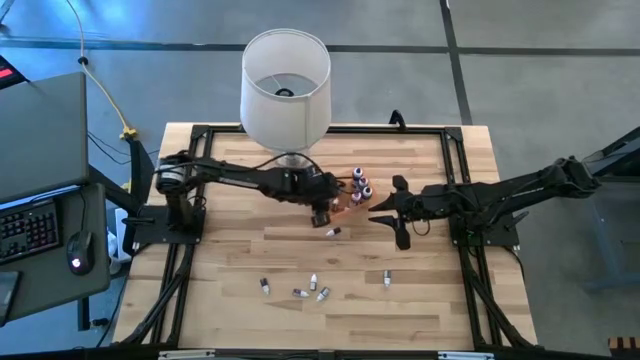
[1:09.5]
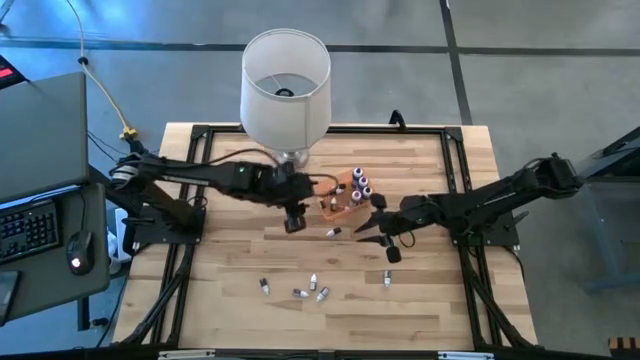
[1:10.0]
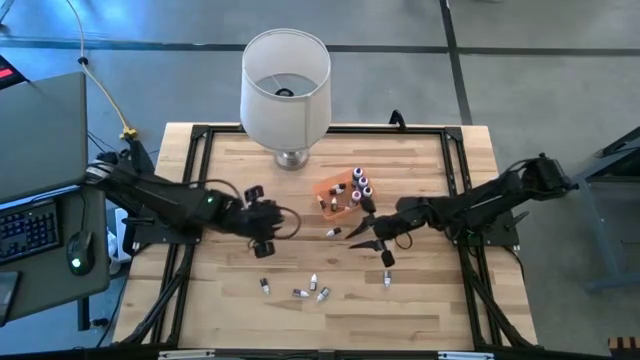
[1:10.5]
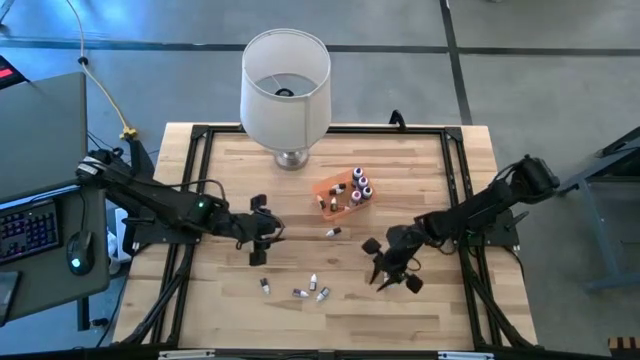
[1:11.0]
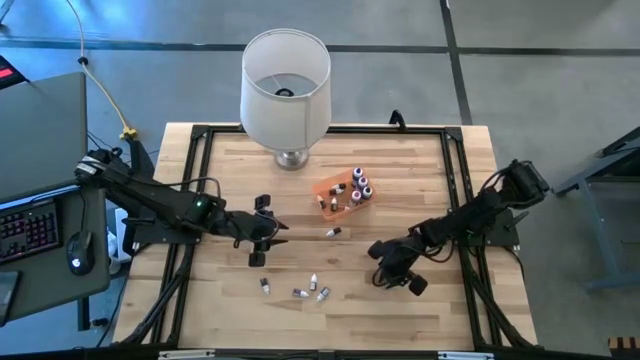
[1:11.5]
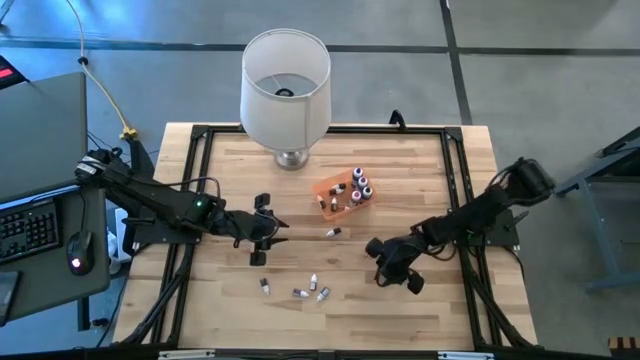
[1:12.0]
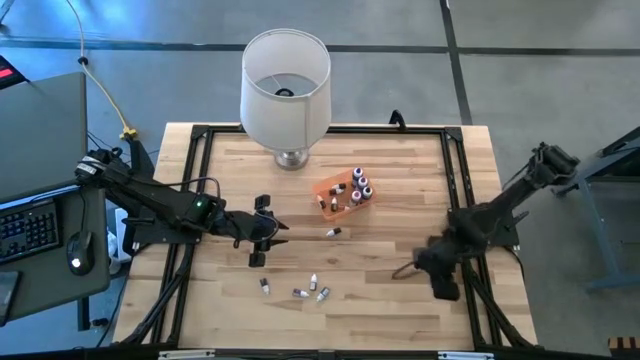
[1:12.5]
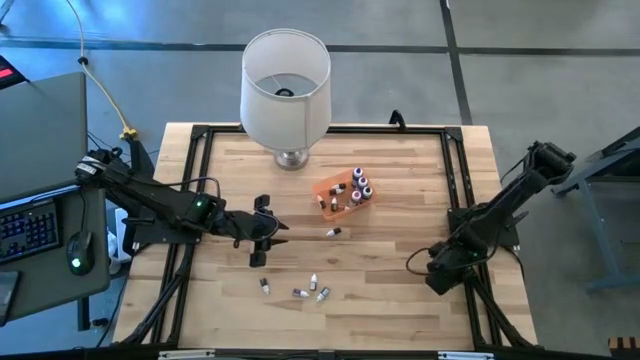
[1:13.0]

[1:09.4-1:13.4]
Task: Pick & Place food coloring
Put the small dark green food coloring bottle into the orange bin

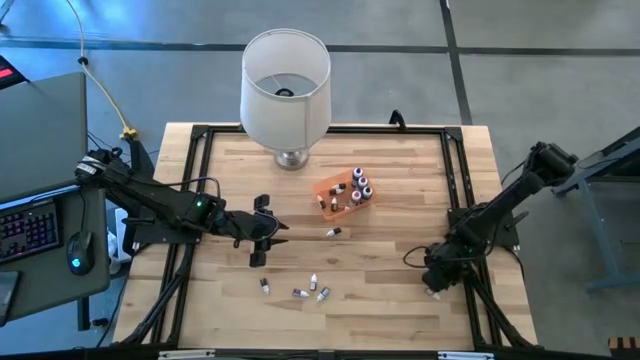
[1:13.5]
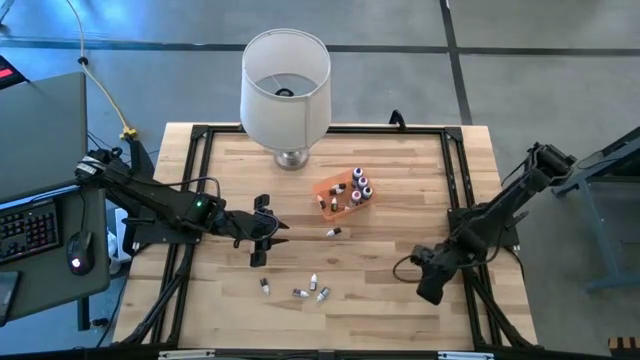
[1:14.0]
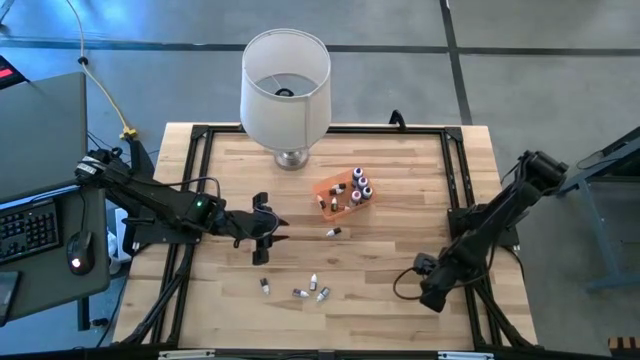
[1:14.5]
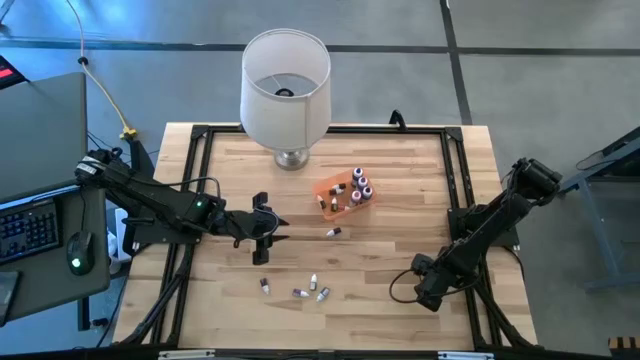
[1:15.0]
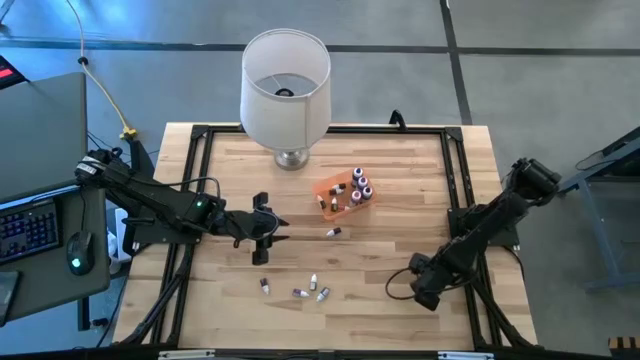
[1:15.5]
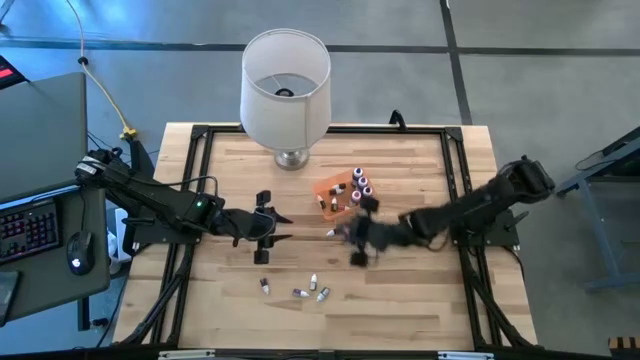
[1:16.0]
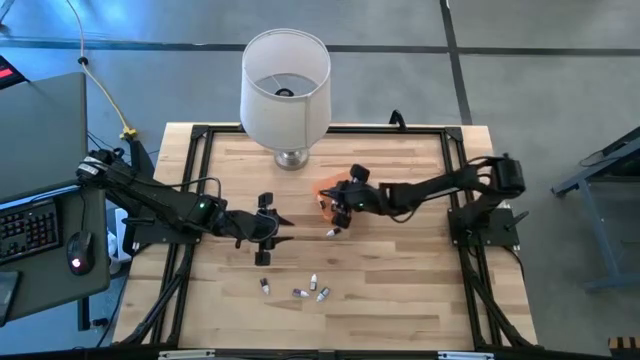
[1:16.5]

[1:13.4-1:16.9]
Put the small dark green food coloring bottle into the orange bin

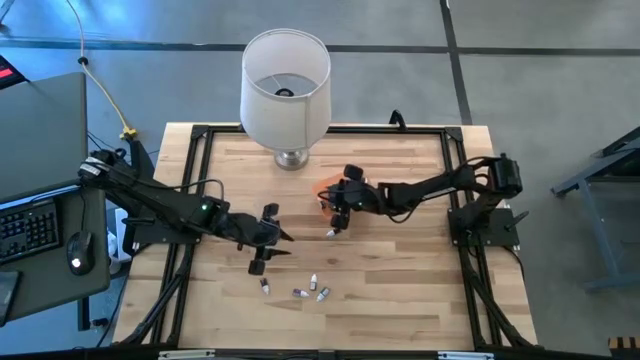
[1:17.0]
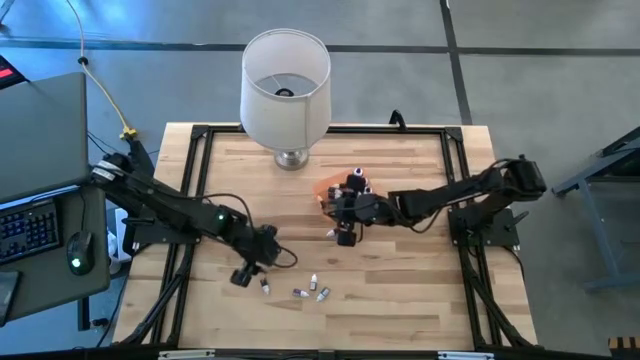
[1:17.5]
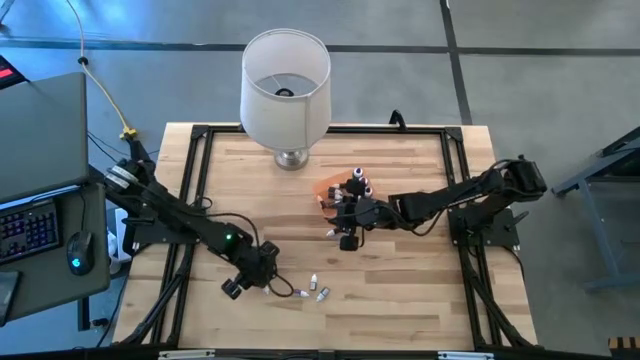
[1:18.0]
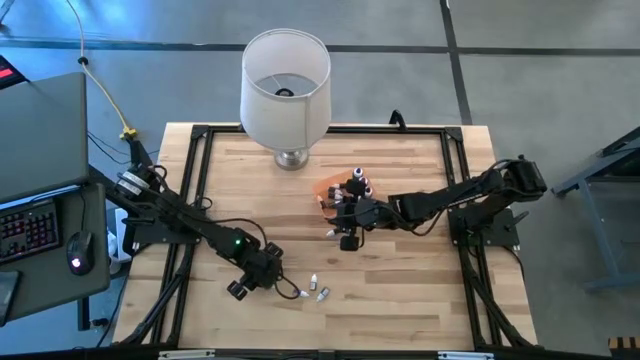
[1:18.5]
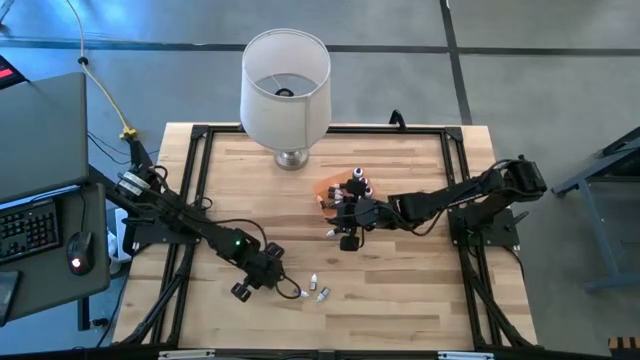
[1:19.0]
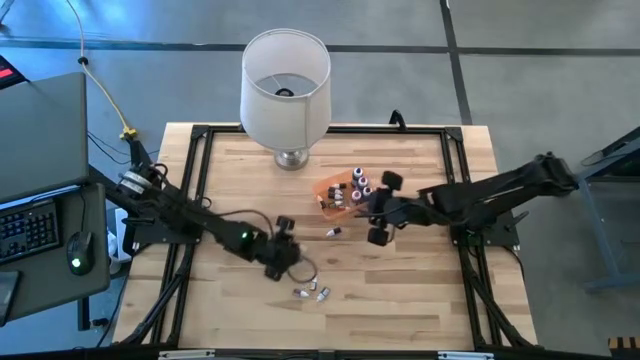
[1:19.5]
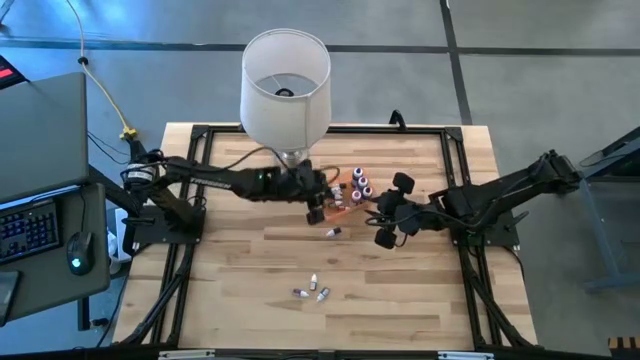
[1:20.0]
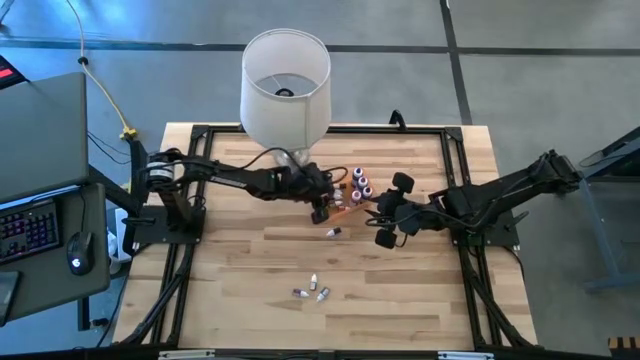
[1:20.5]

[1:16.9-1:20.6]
Put the left small purple food coloring bottle into the orange bin

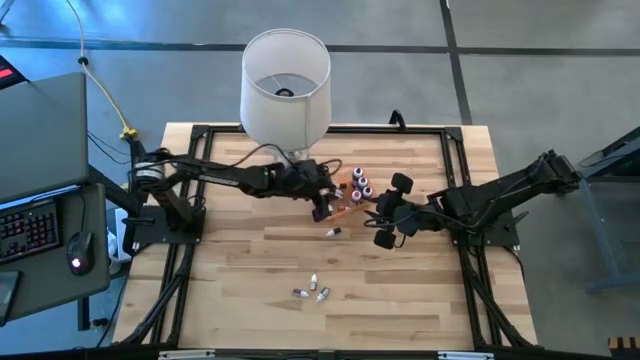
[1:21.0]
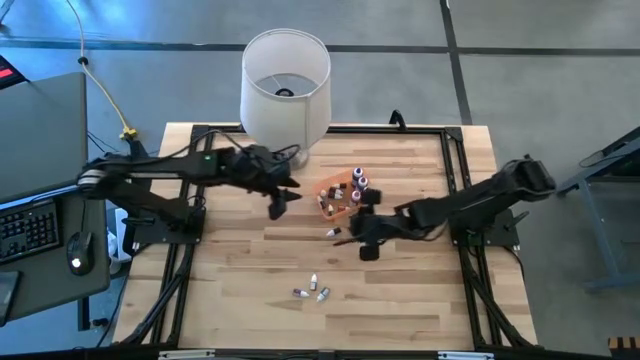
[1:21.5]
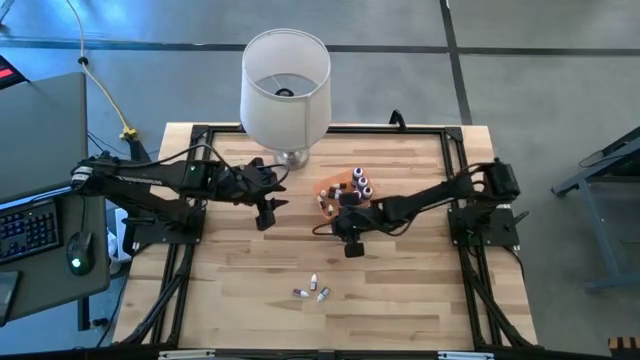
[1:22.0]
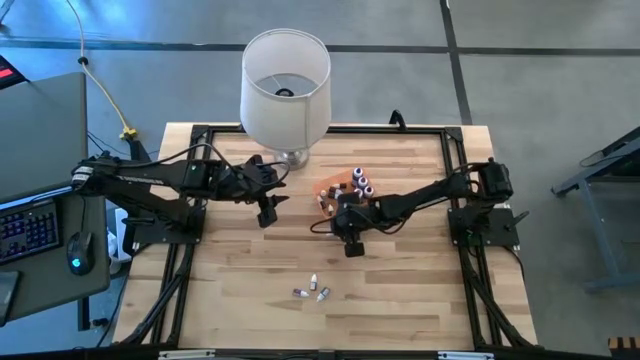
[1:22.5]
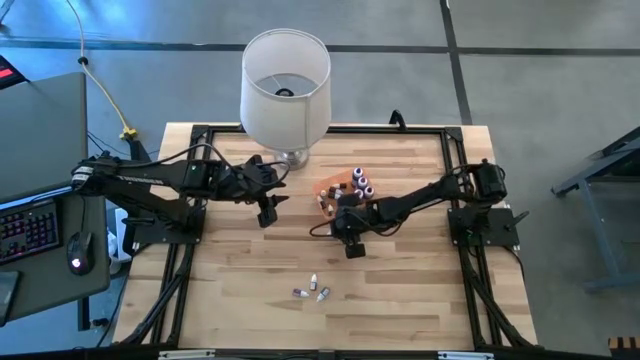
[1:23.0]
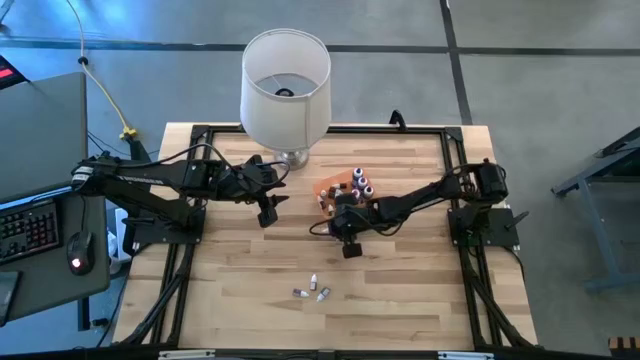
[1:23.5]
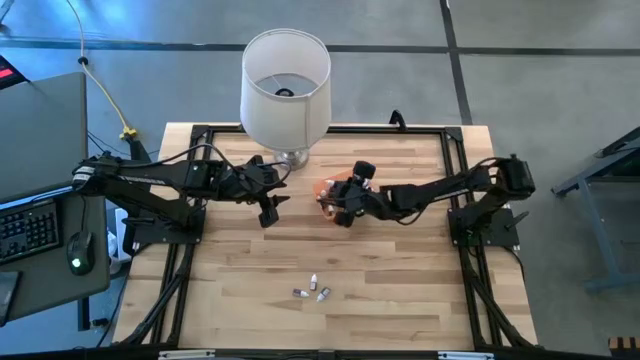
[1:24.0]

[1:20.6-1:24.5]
Put the small black food coloring bottle into the orange bin

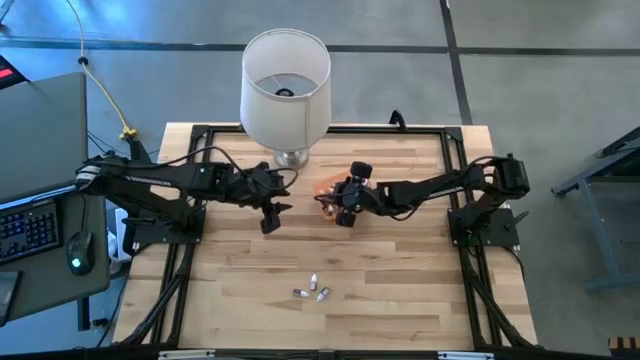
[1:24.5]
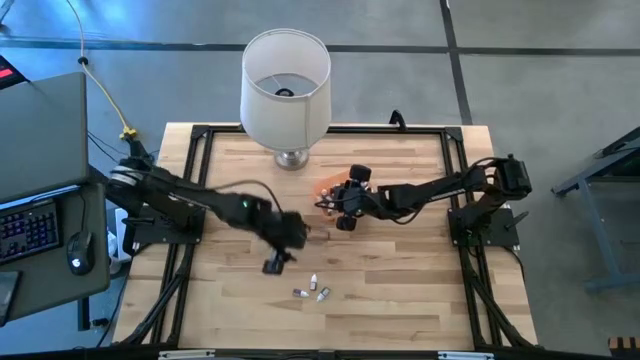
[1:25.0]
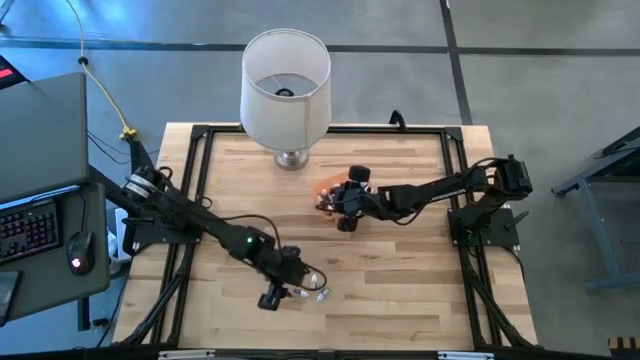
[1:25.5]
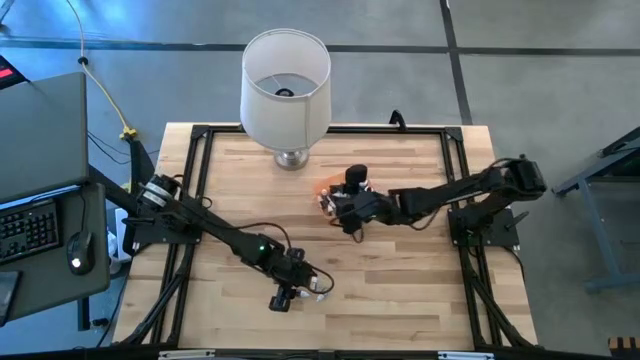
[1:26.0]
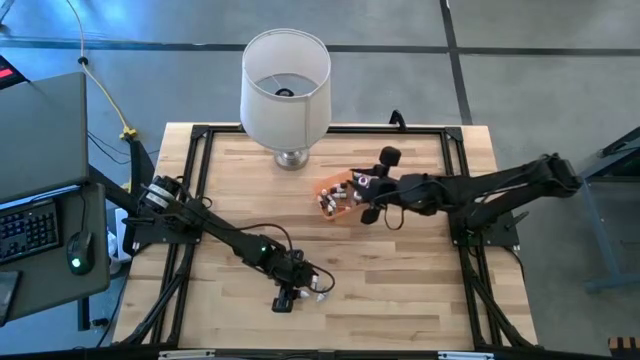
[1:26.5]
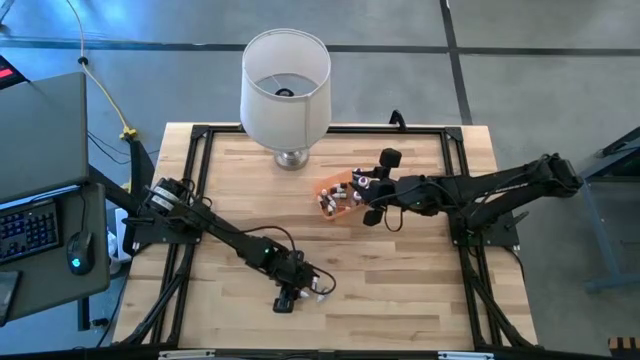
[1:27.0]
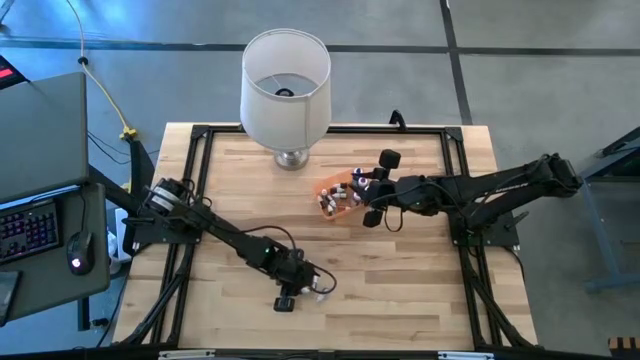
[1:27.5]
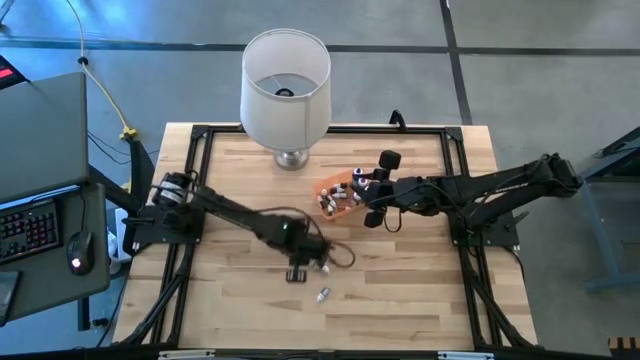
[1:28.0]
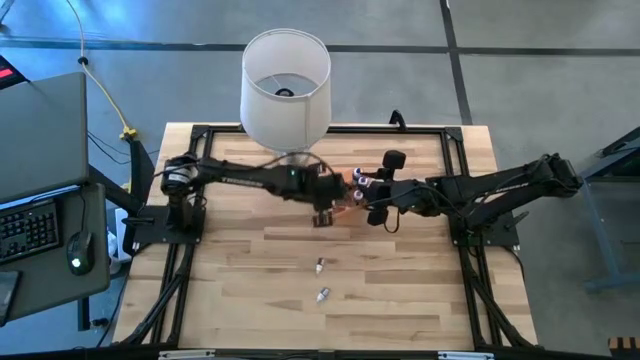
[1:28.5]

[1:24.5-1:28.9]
Put the small purple food coloring bottle into the orange bin

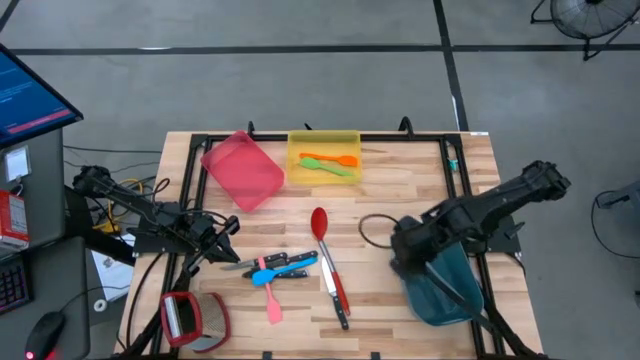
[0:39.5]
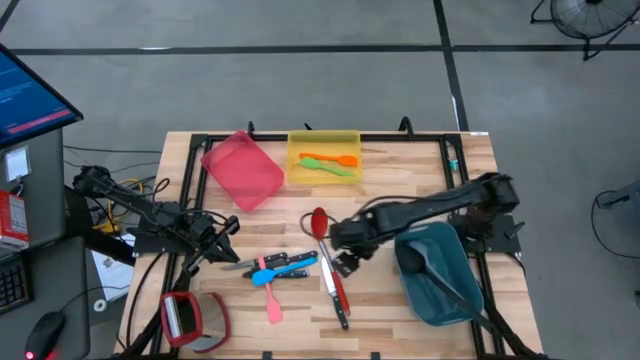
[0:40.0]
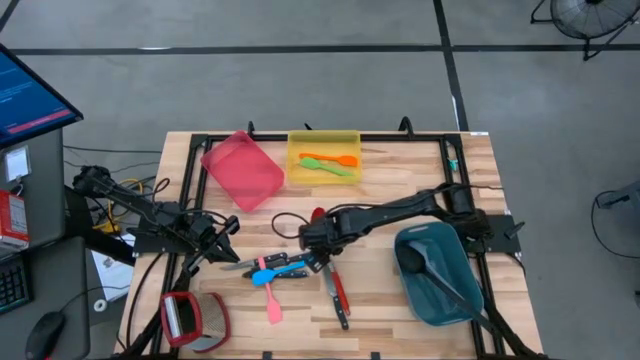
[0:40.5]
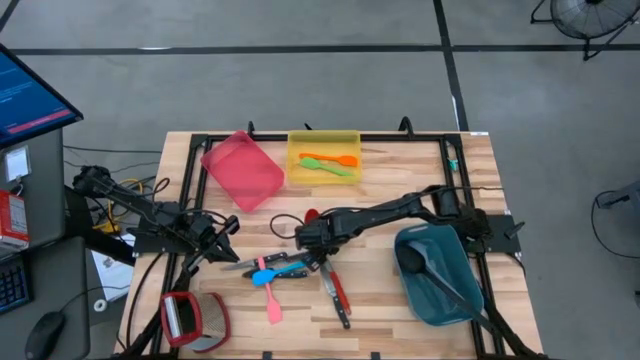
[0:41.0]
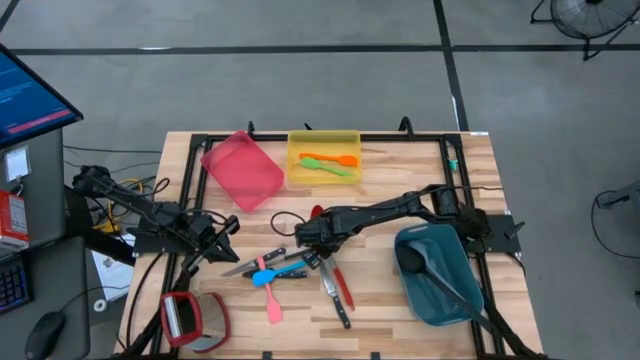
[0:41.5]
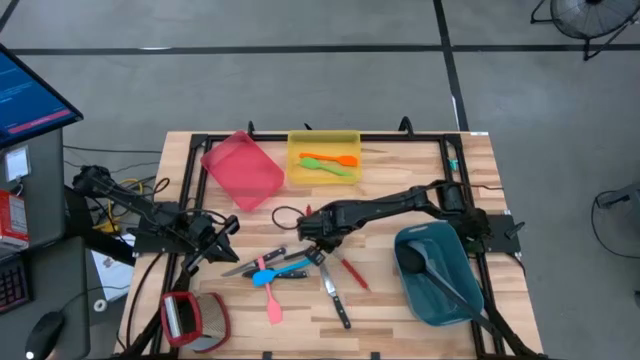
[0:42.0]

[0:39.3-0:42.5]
Task: Pick & Place Kitchen Items
Put the red serving spoon into the dark blue bin
